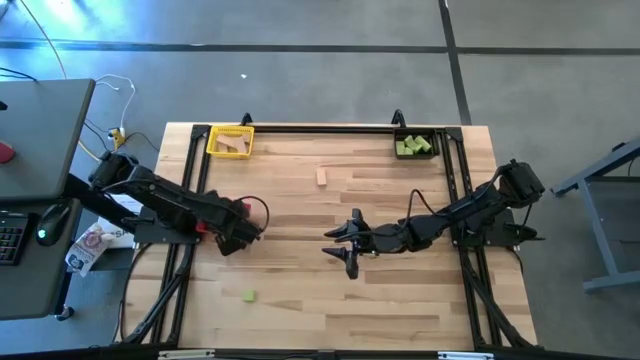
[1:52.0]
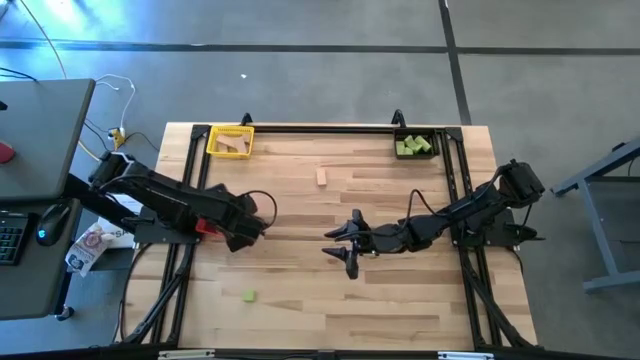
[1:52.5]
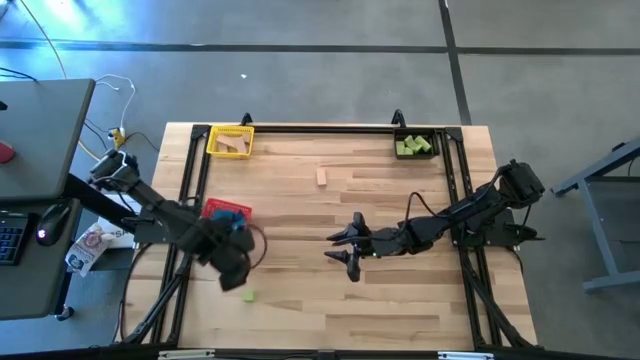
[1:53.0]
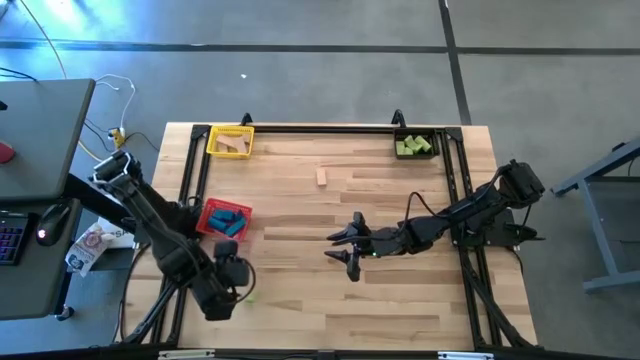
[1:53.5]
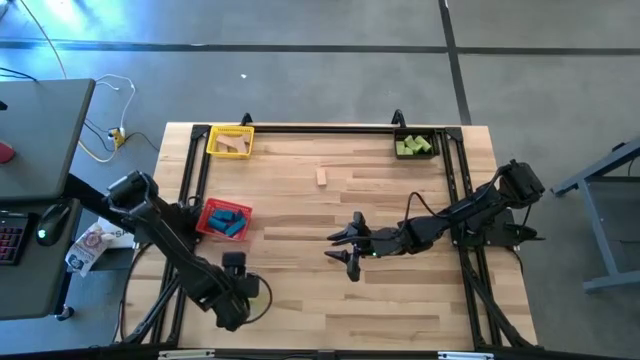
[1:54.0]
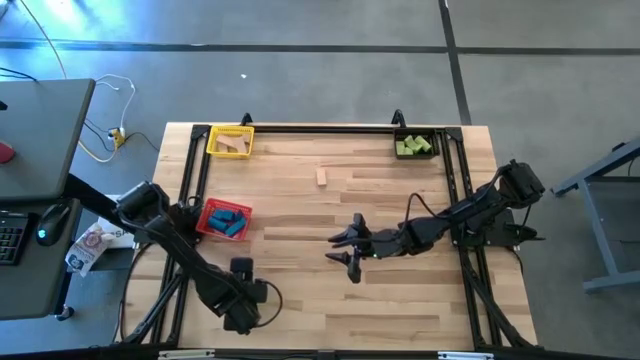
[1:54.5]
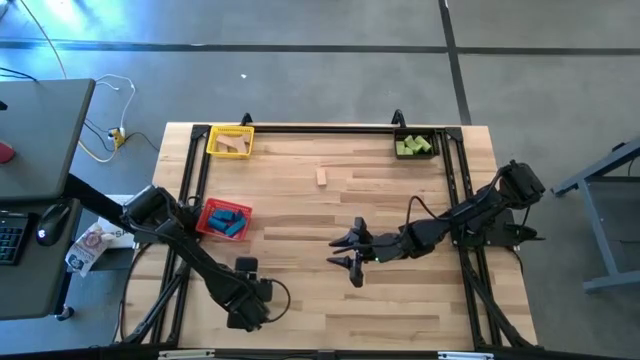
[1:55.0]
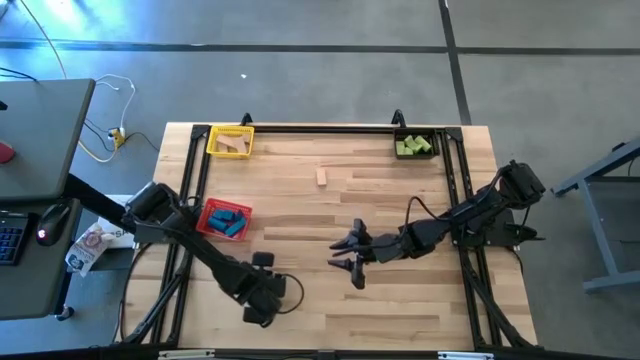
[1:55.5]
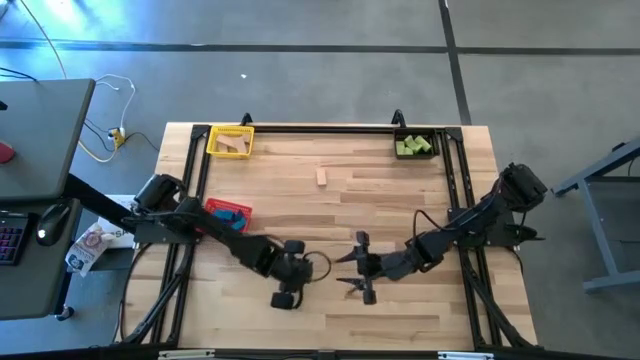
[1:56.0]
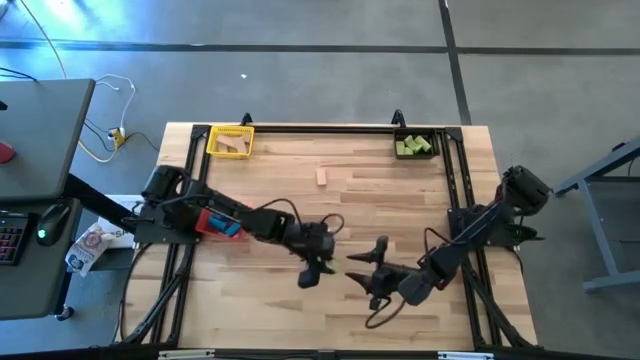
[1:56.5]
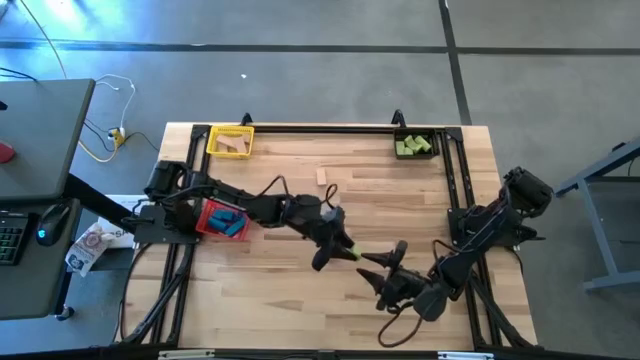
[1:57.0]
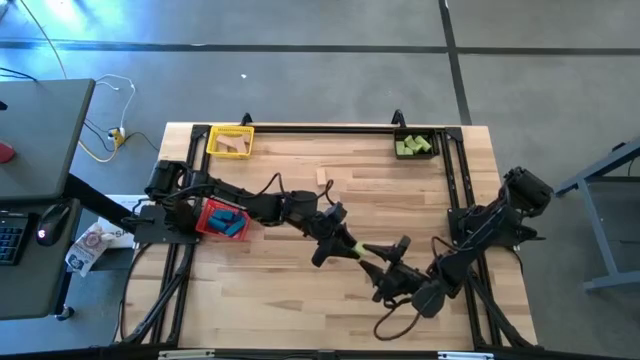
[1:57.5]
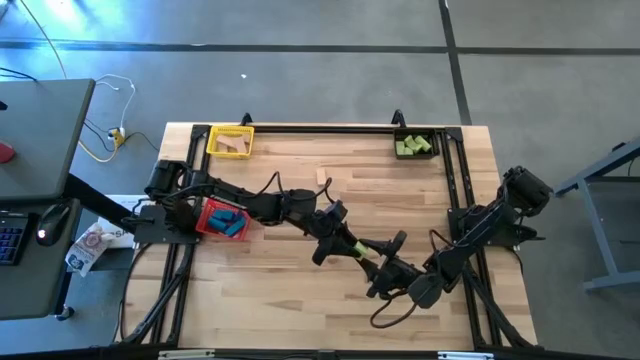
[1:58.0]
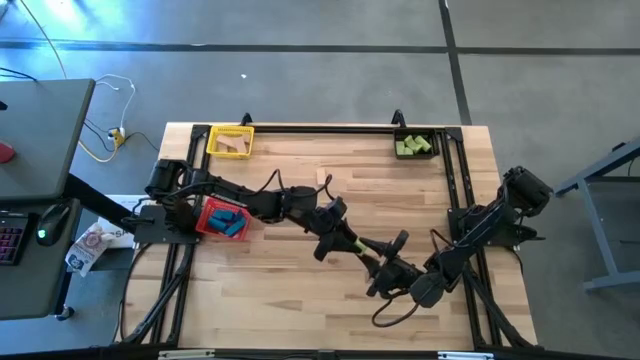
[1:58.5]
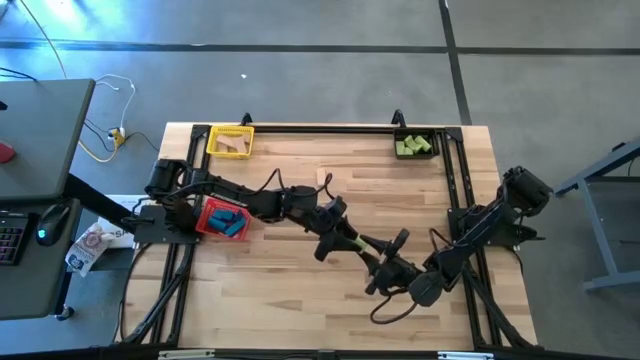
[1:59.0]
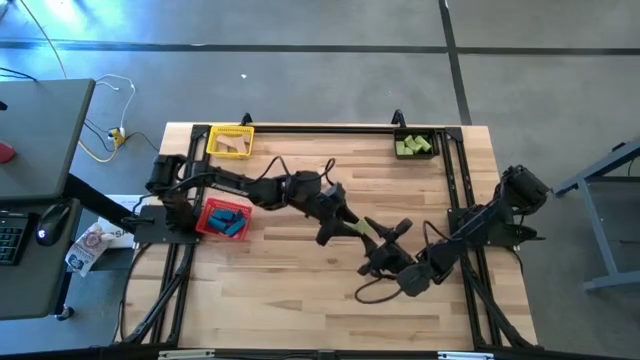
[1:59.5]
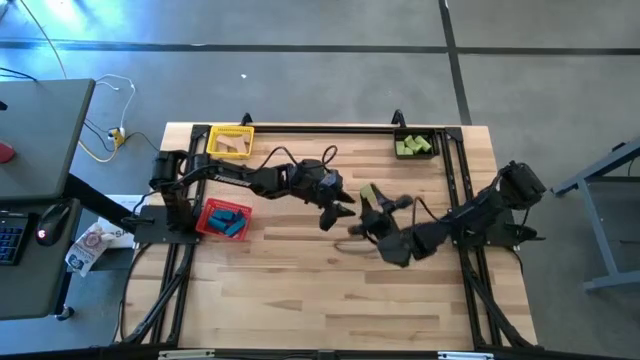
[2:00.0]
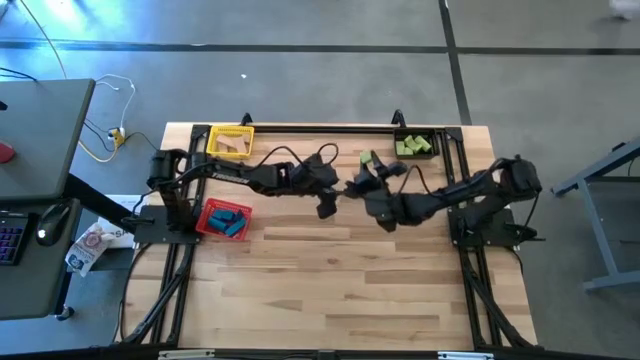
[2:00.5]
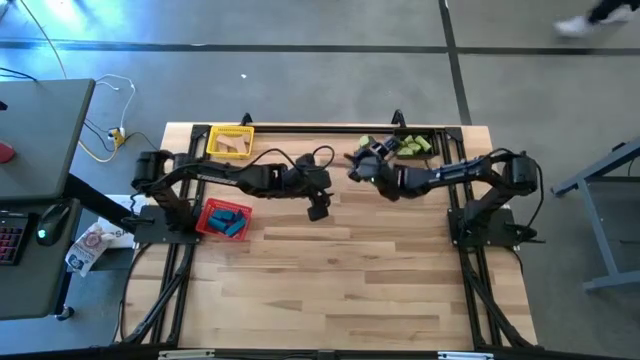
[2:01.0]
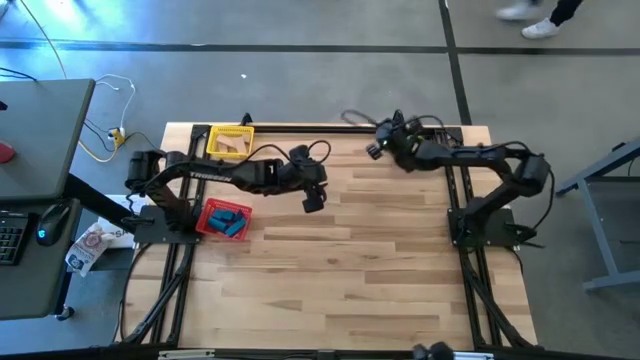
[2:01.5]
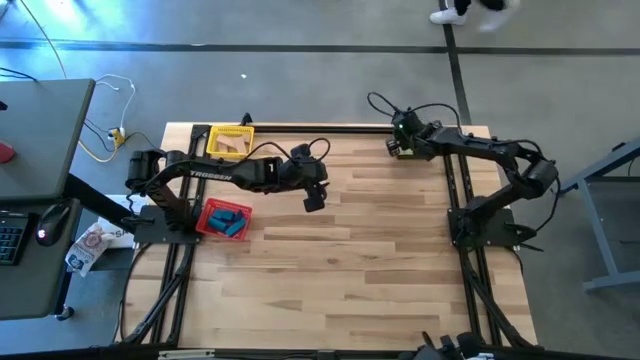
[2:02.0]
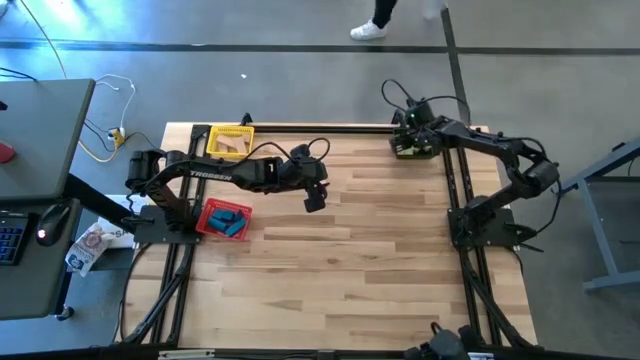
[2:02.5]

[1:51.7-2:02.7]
Task: Sort & place blocks by color
Put the green block into the black bin

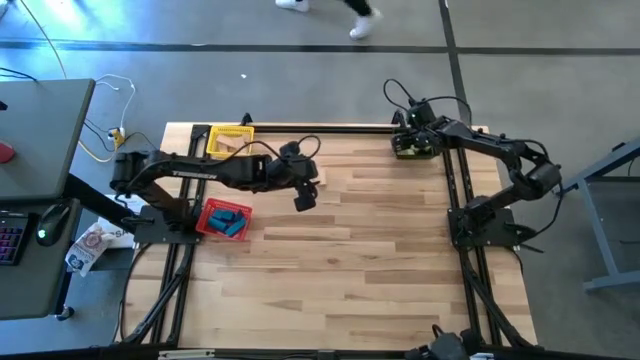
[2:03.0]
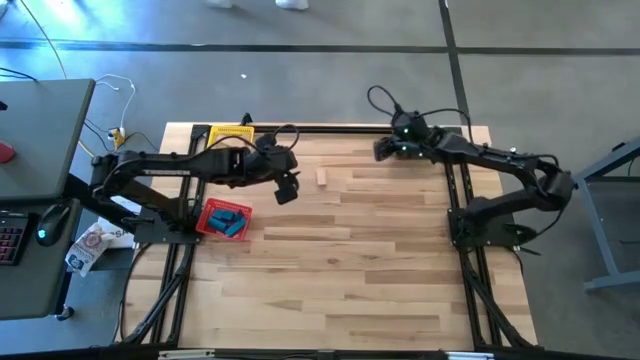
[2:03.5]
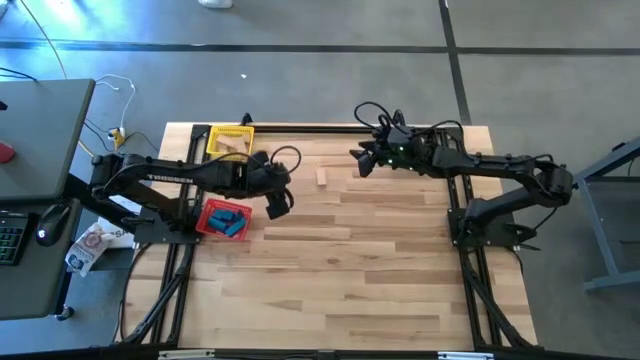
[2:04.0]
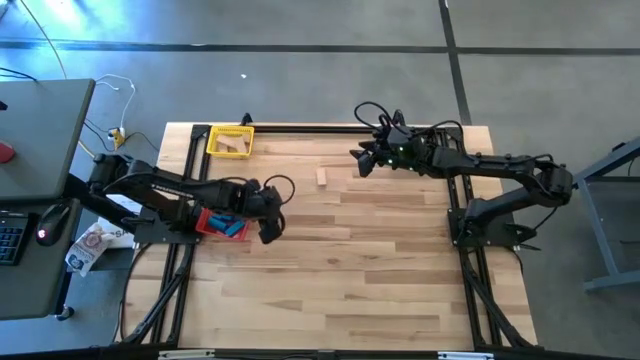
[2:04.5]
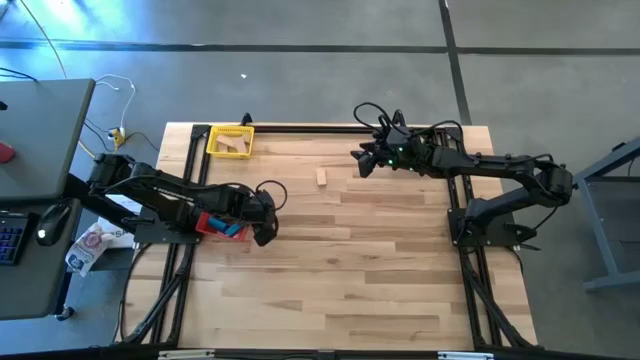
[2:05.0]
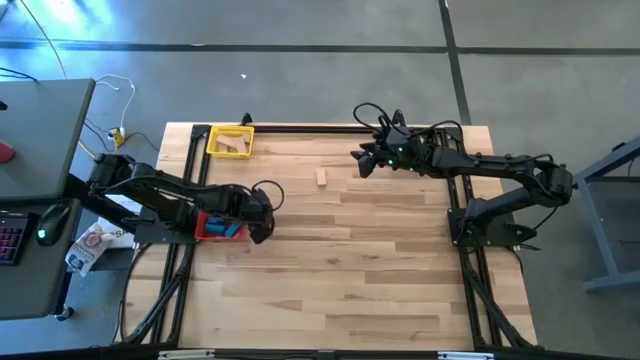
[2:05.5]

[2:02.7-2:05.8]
Adjust the red bin

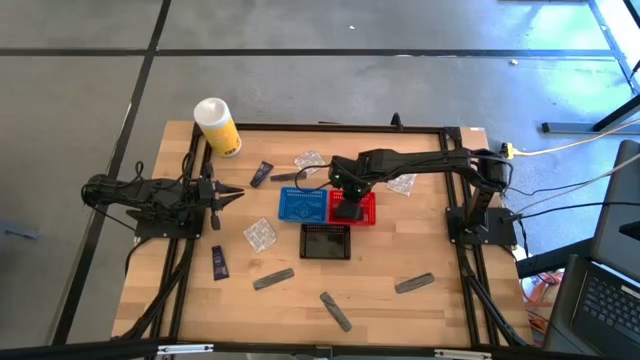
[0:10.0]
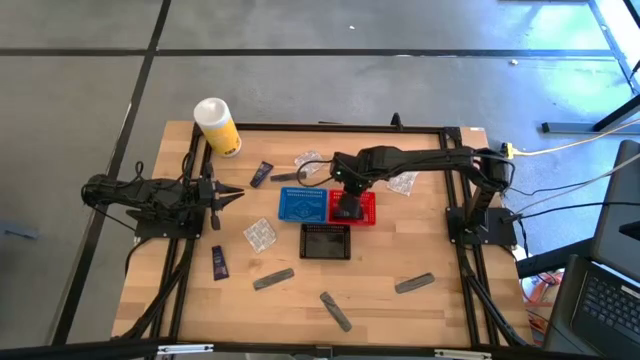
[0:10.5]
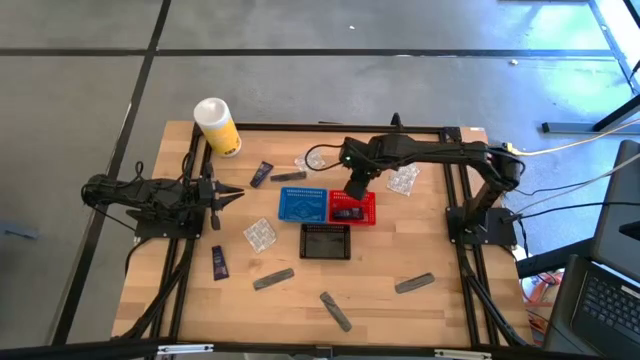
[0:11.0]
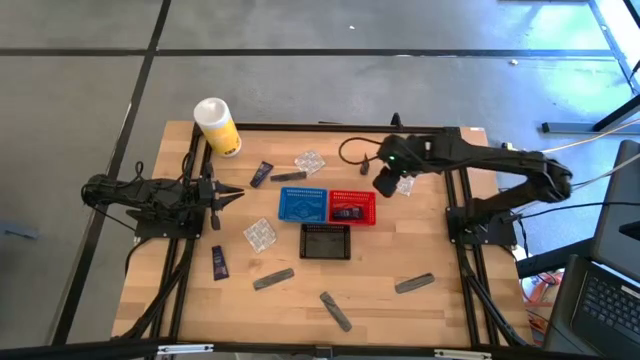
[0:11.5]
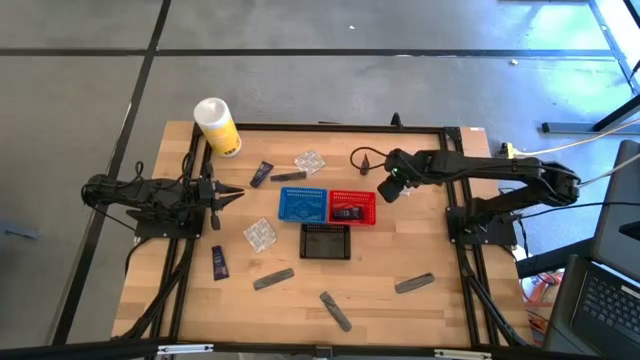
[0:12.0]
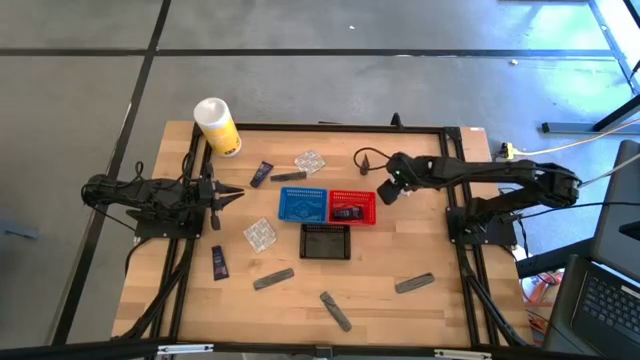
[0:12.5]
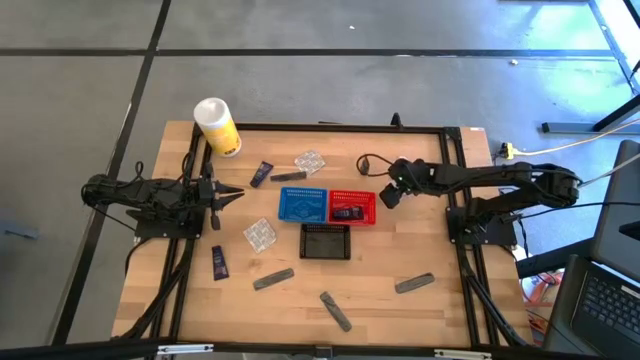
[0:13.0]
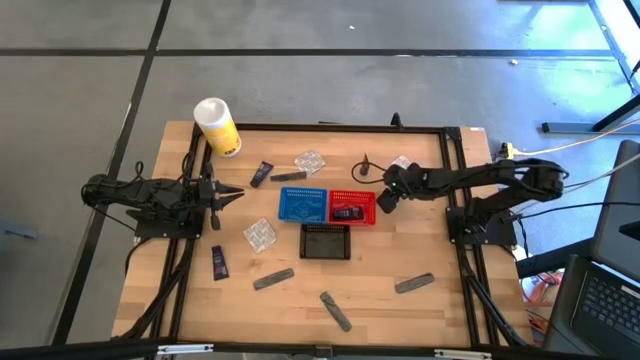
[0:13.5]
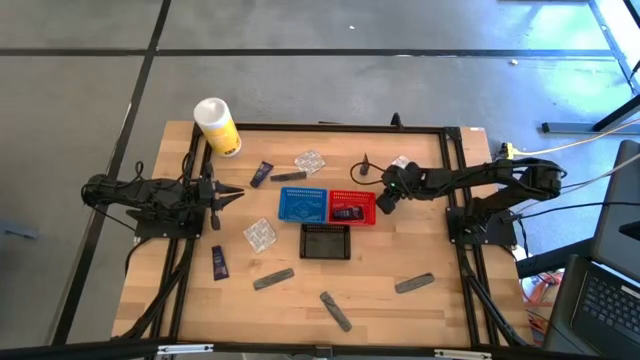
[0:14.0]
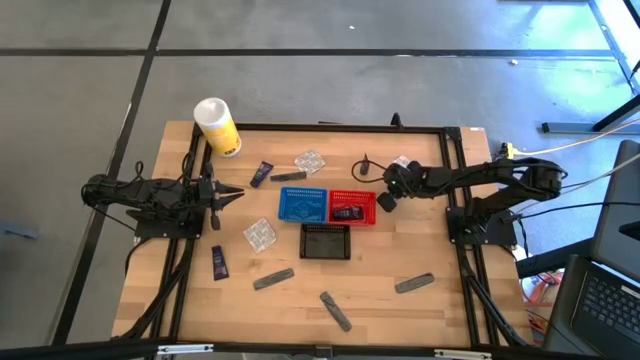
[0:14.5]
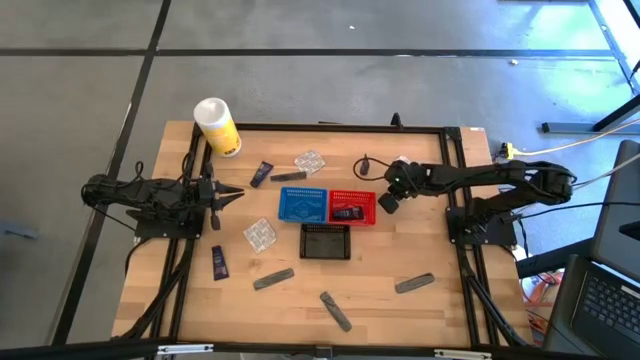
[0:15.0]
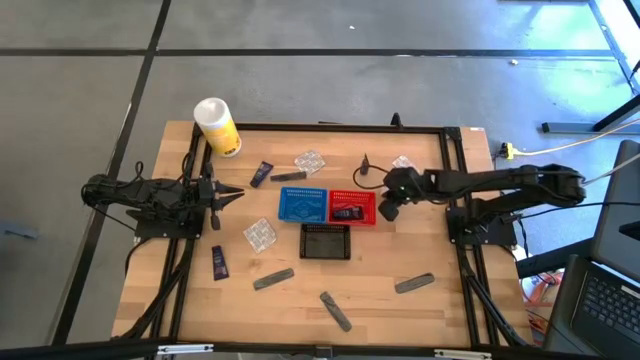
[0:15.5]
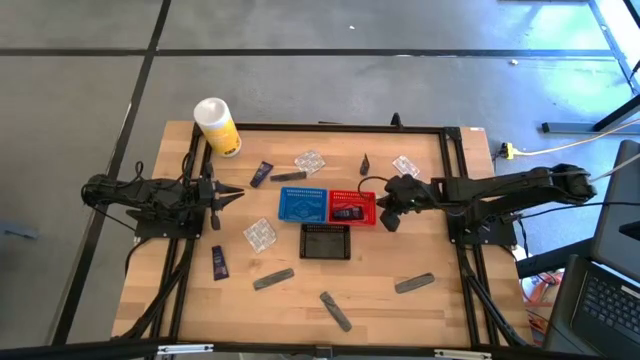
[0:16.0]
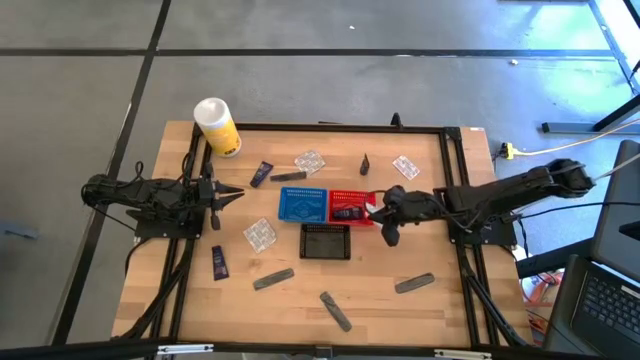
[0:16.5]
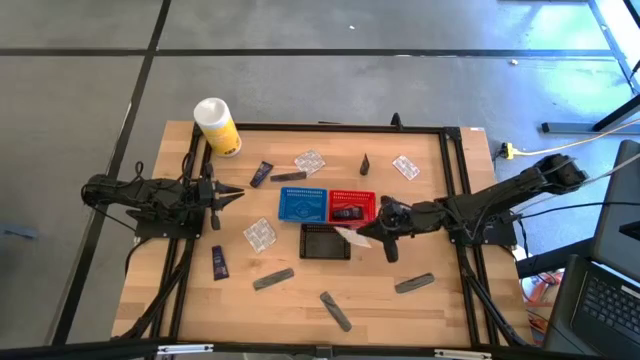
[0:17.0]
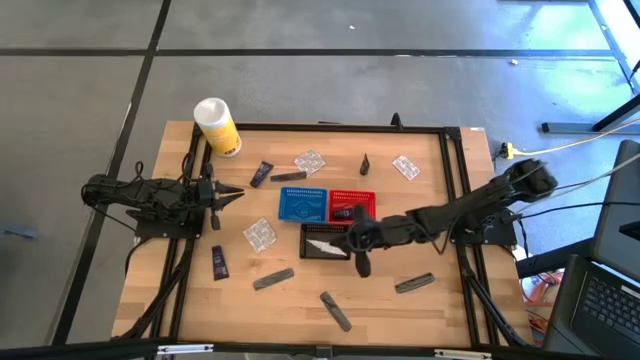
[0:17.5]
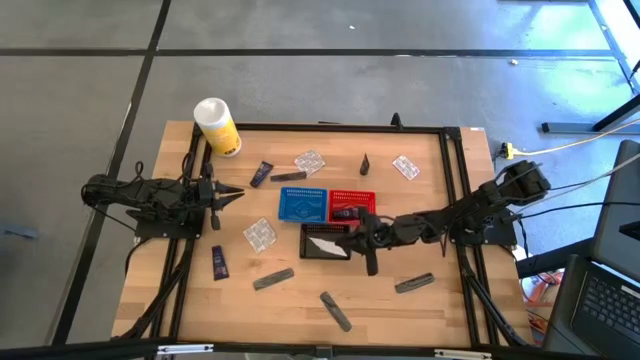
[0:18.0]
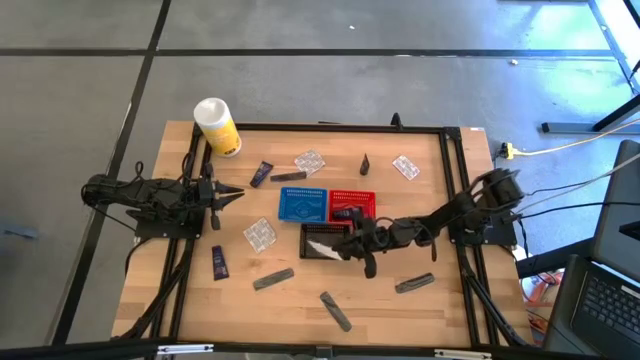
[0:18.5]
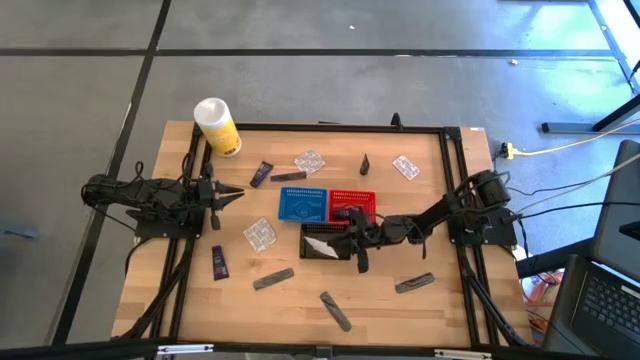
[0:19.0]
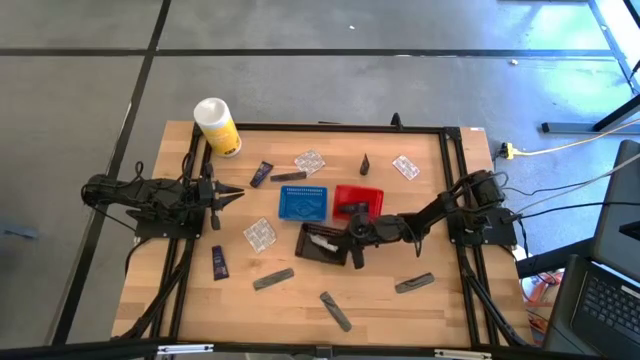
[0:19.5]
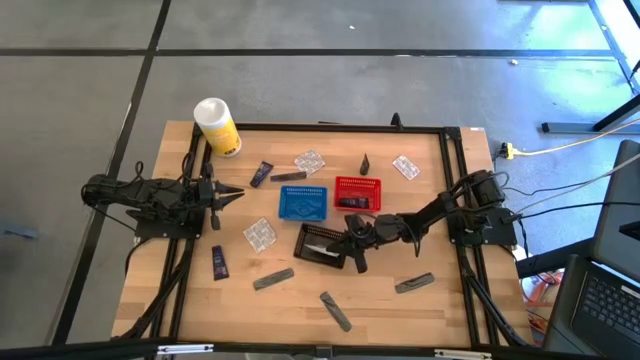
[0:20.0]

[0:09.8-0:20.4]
Task: Pick & Place Travel size toiletries
Put the white bandage into the black bin
